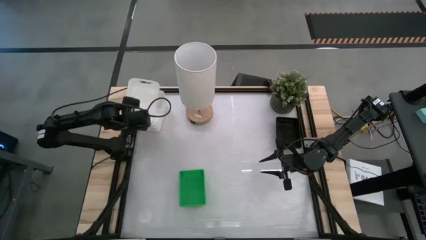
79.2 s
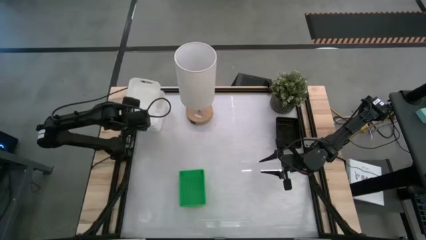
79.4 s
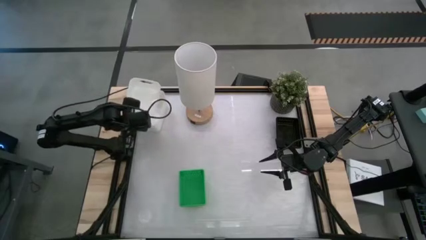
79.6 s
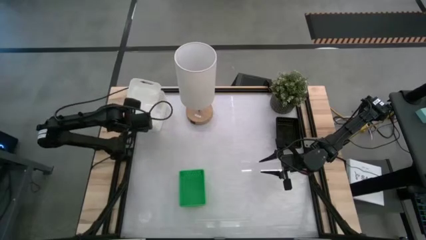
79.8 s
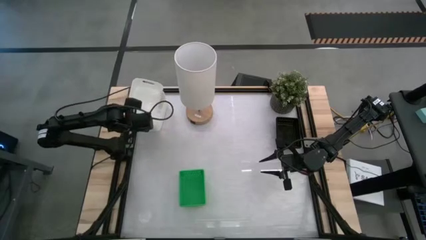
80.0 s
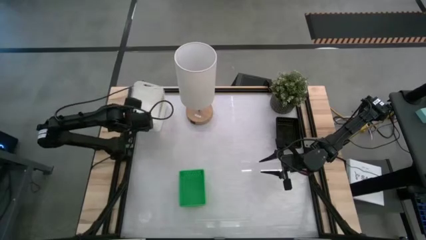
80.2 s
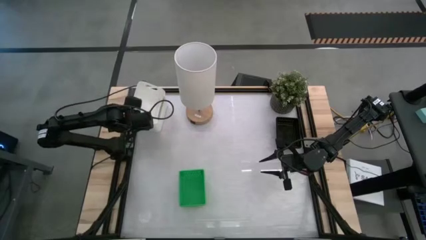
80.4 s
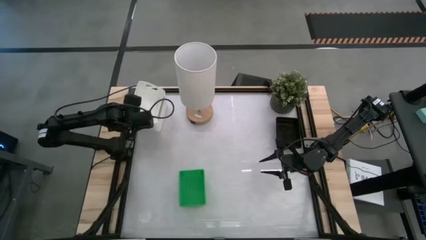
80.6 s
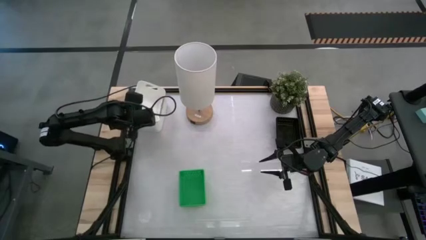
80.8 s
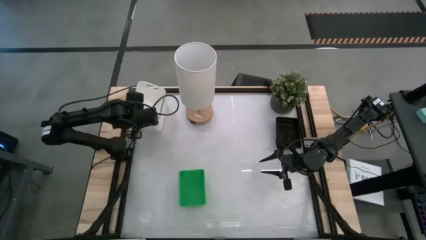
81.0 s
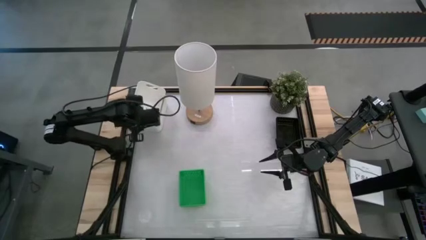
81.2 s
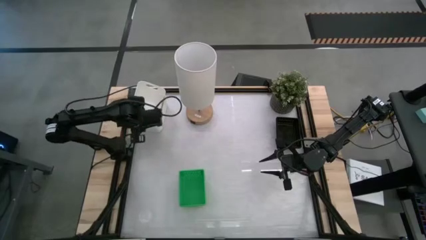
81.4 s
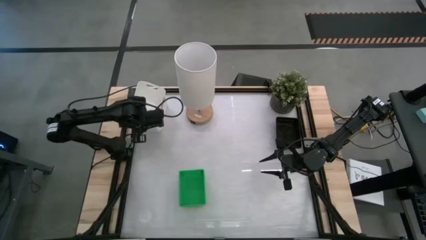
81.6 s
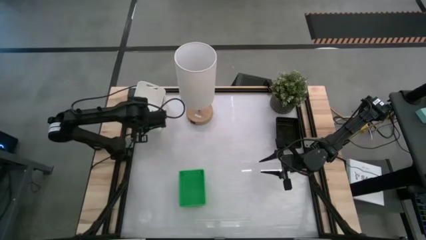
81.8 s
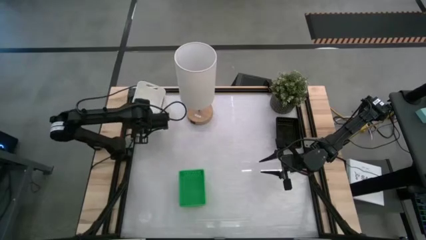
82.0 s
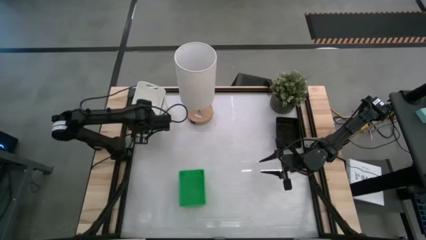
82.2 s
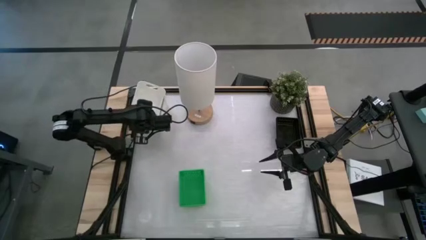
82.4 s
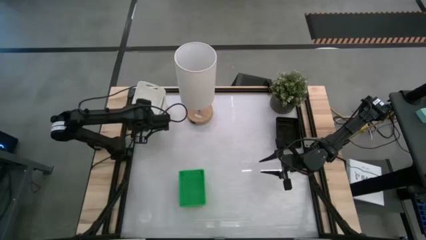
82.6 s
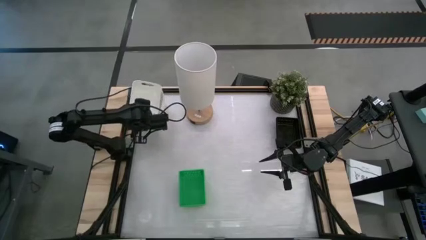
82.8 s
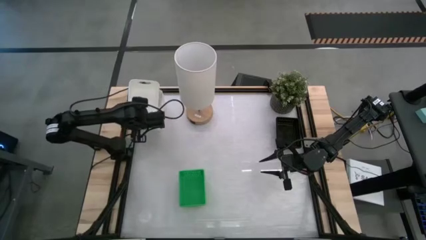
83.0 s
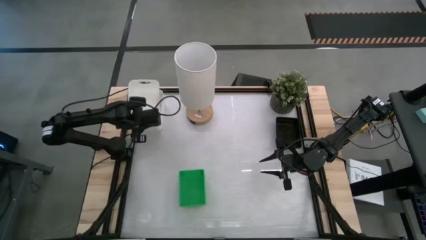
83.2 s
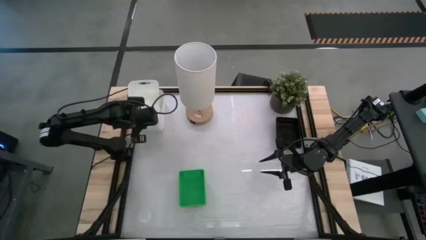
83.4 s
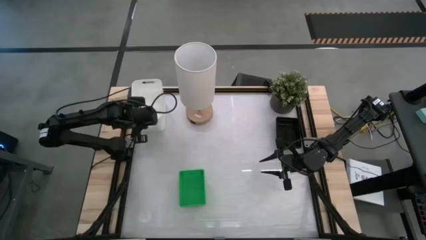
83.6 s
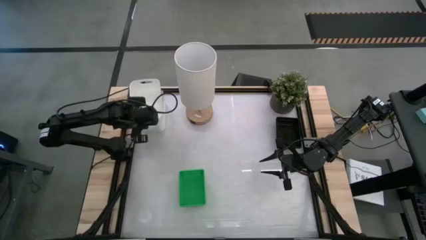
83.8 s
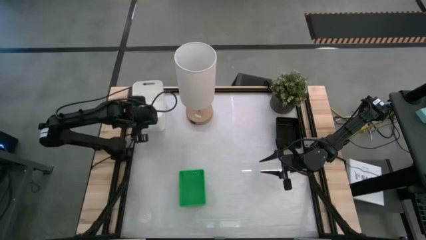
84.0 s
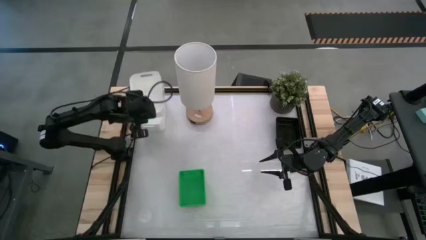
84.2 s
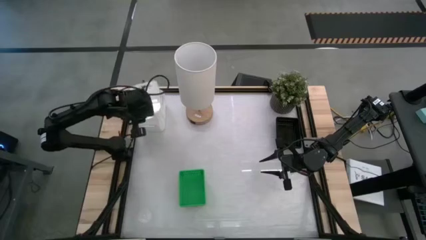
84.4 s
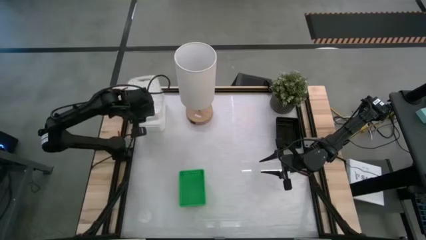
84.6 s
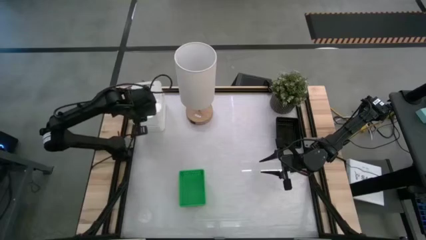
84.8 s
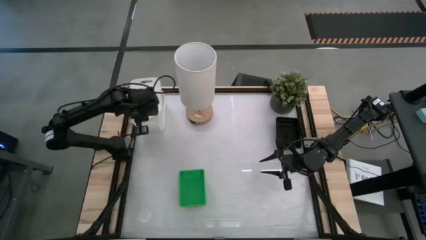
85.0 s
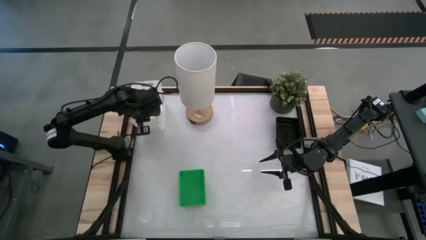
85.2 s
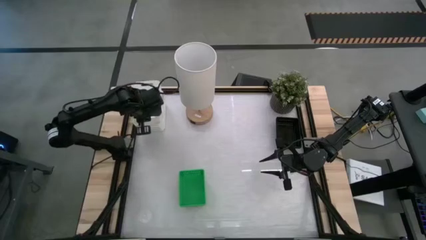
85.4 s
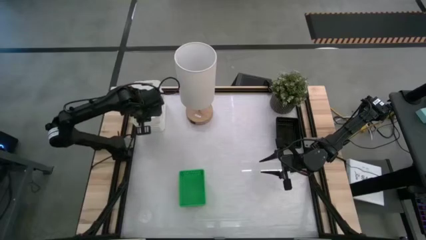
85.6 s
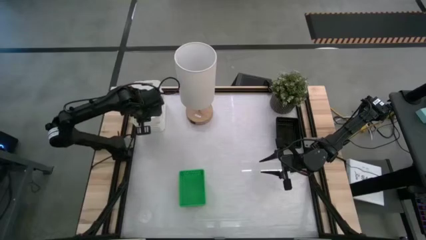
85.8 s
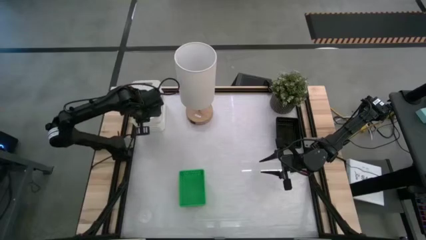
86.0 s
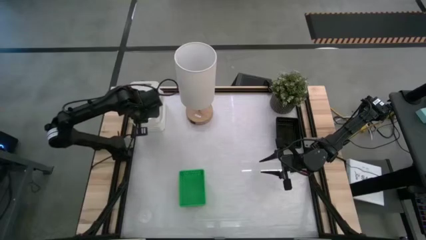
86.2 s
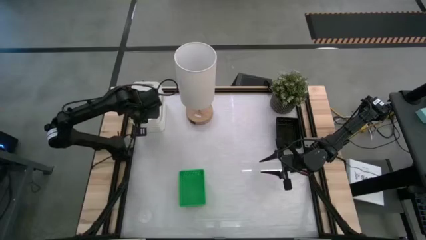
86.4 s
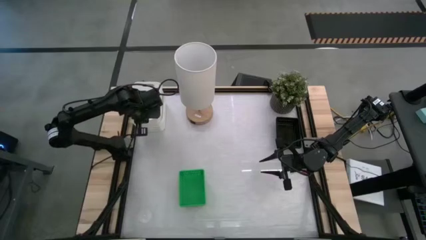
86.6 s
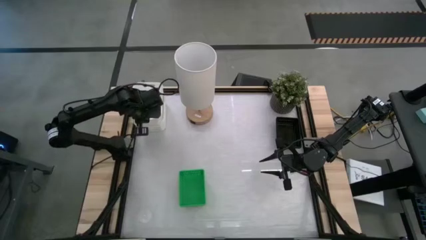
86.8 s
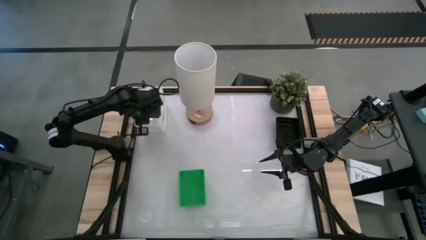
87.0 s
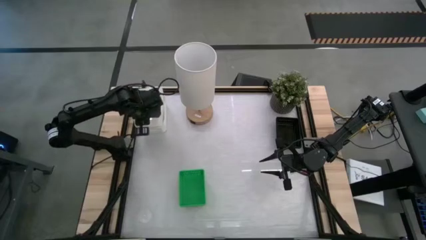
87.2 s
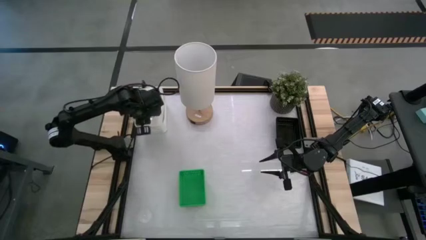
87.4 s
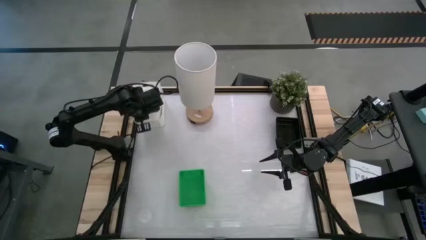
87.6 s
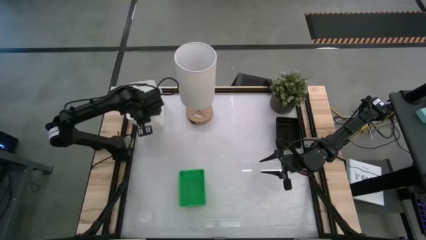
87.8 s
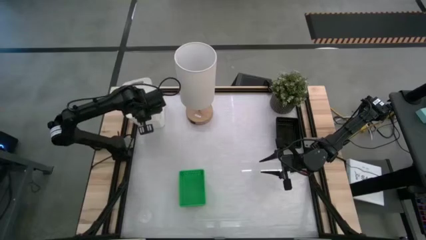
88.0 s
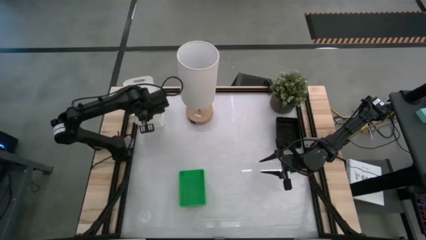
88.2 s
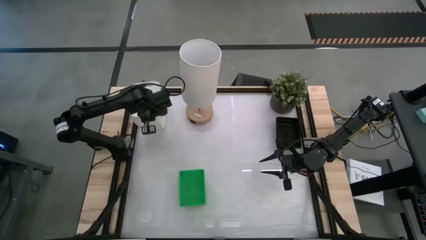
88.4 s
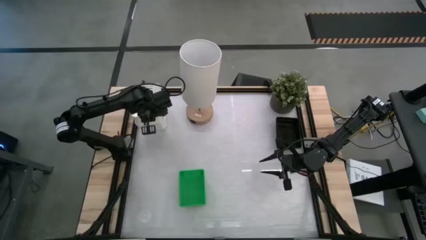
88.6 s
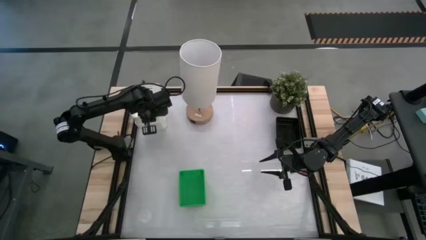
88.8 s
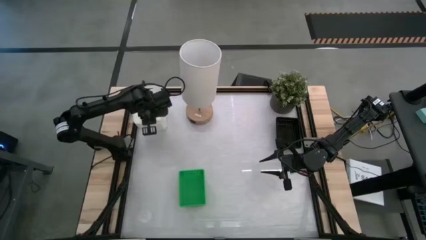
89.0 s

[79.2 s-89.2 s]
Stack the white bin on the white bins

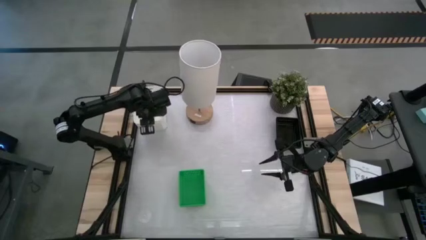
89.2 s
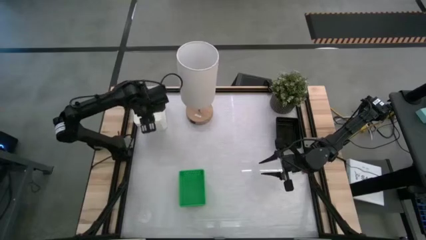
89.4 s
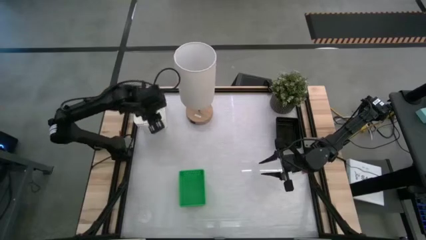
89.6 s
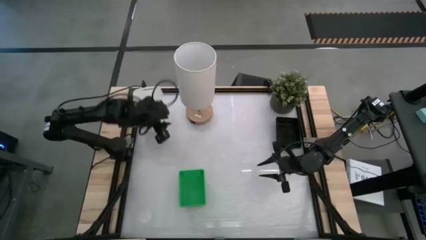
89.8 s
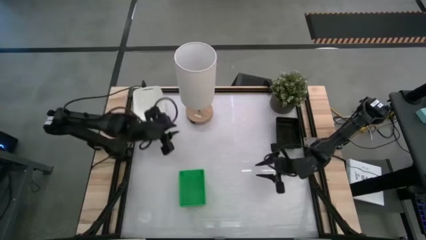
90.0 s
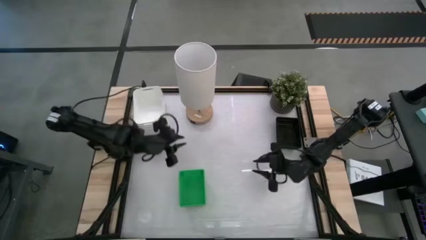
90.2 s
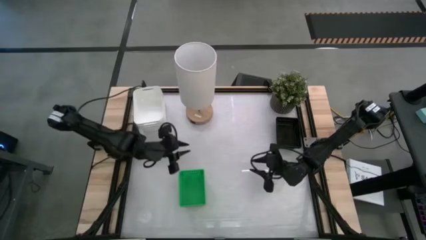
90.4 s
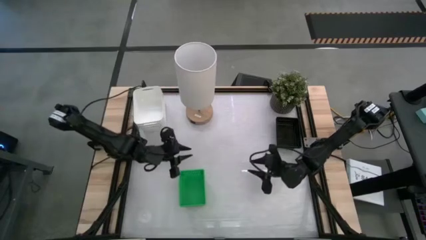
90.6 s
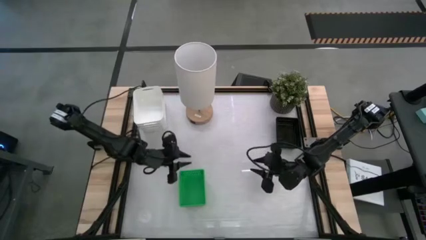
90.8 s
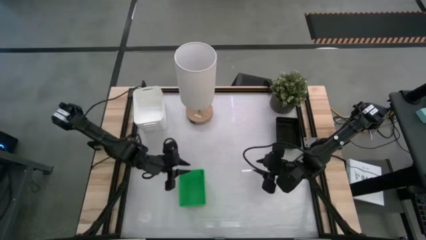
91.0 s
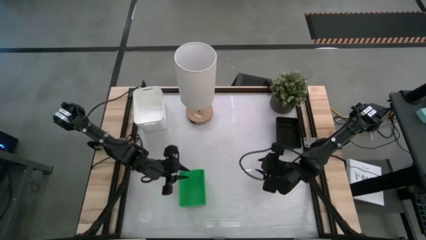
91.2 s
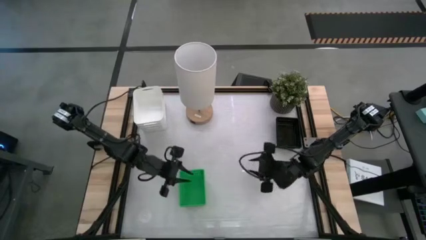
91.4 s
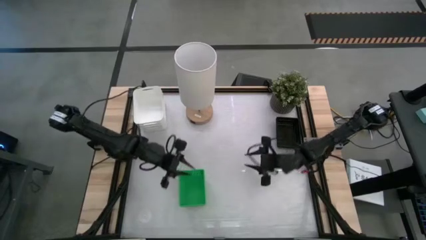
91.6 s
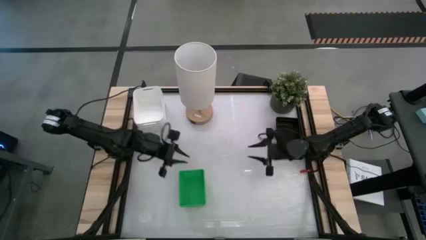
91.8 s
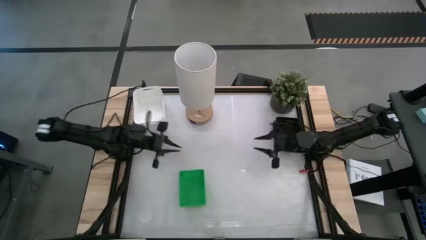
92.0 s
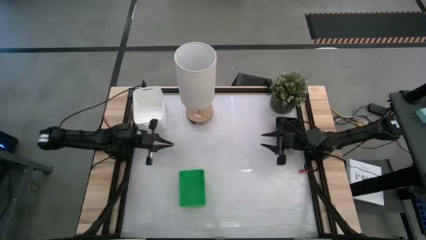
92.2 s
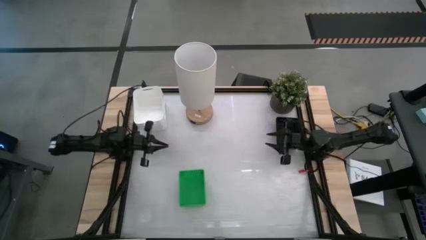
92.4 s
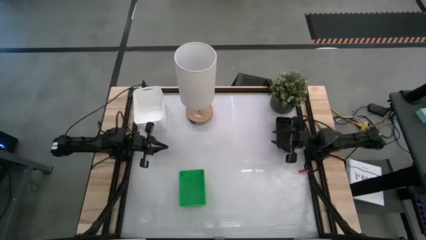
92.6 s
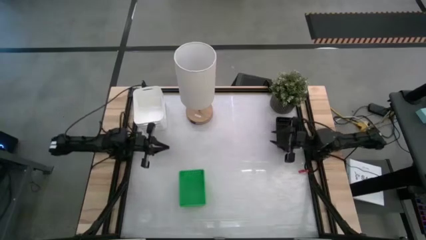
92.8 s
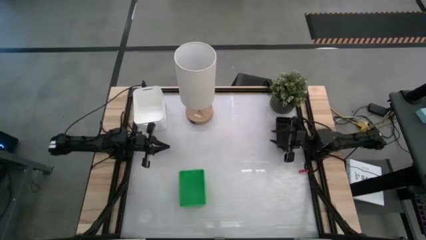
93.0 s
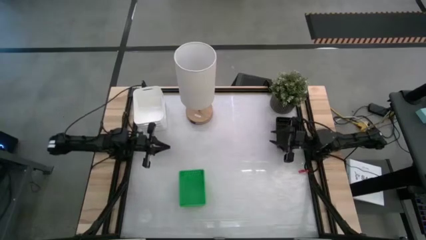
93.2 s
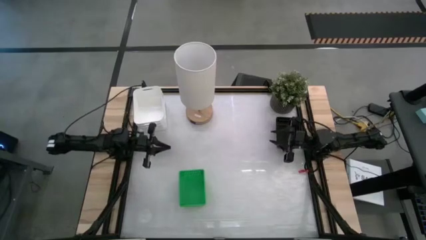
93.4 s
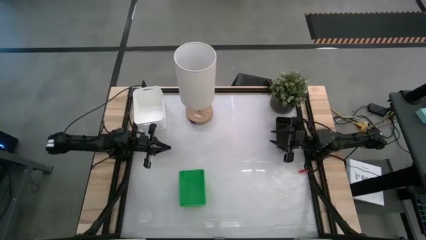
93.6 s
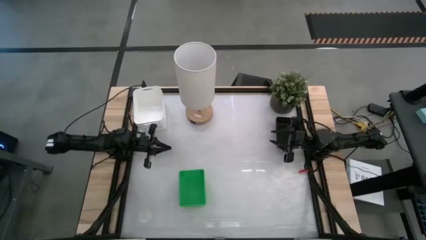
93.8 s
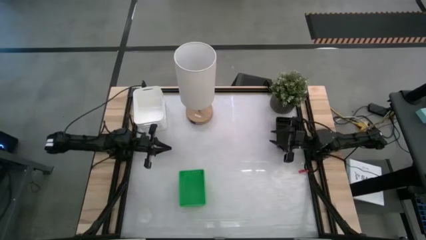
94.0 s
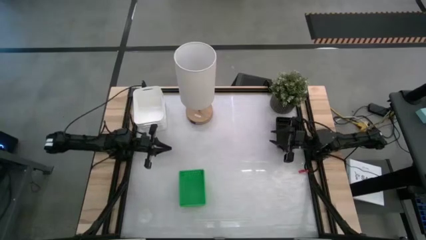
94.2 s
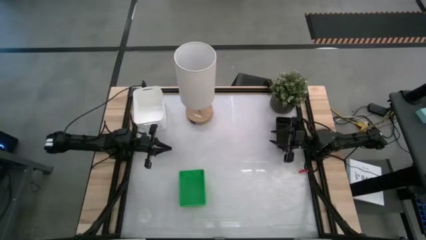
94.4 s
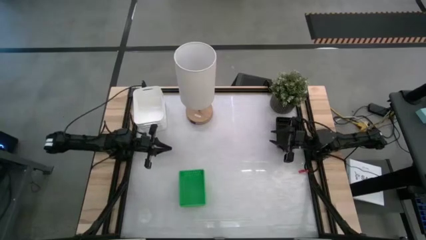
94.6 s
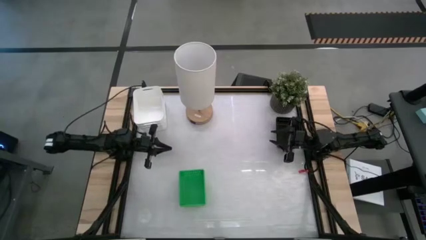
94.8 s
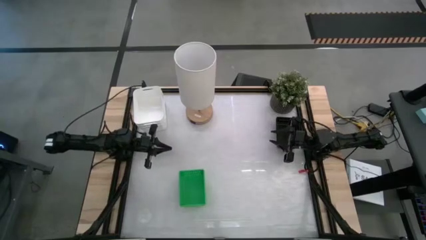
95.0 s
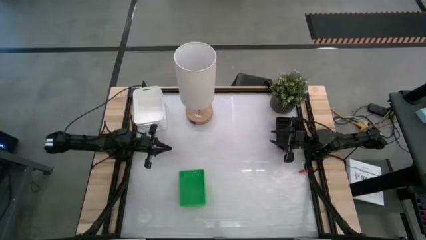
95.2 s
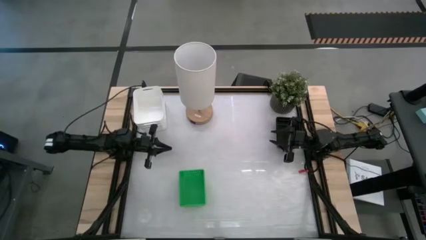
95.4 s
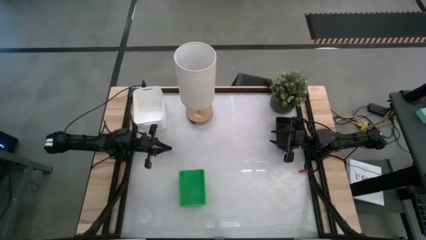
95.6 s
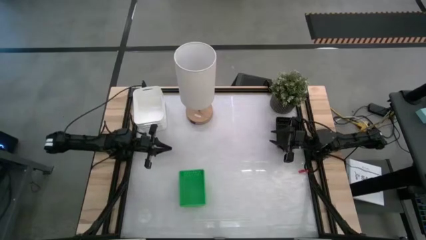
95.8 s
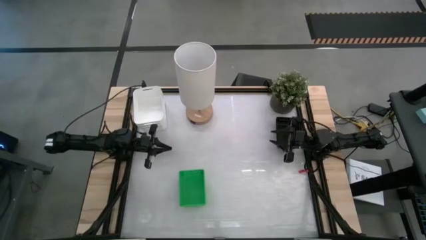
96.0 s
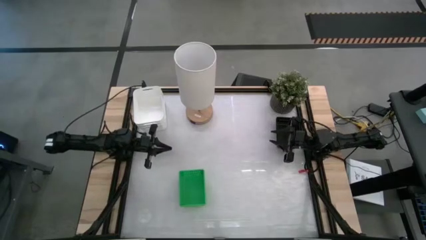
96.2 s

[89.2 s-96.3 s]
Return to Home Position
